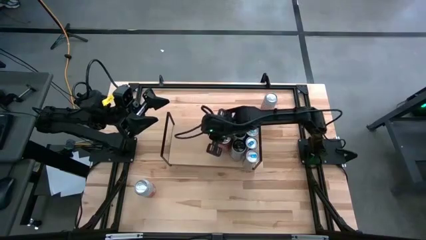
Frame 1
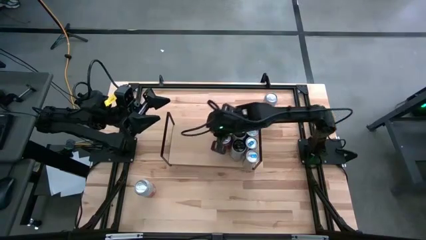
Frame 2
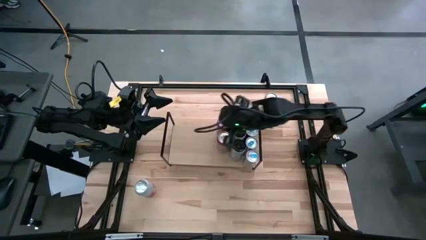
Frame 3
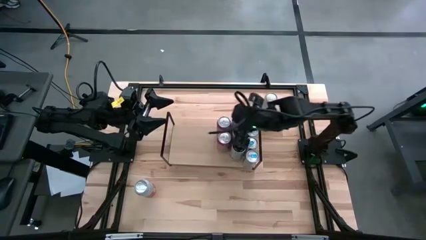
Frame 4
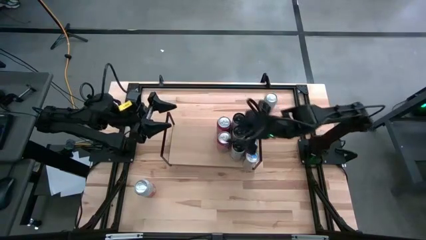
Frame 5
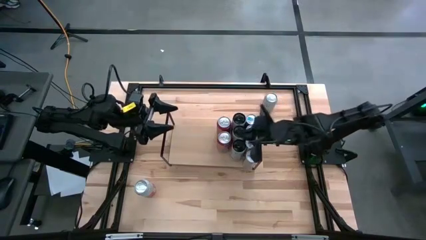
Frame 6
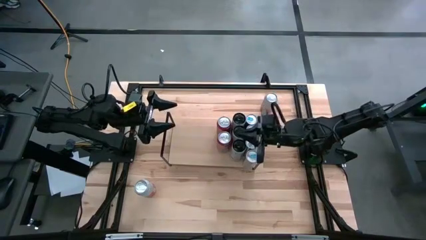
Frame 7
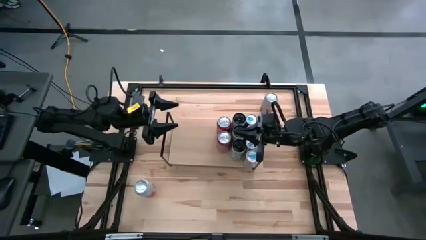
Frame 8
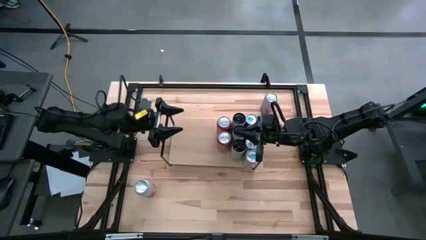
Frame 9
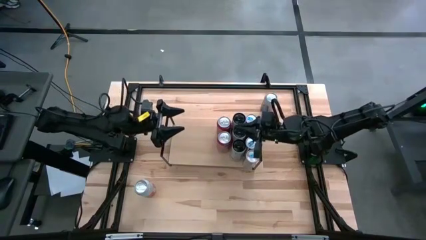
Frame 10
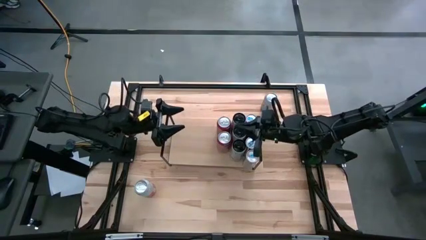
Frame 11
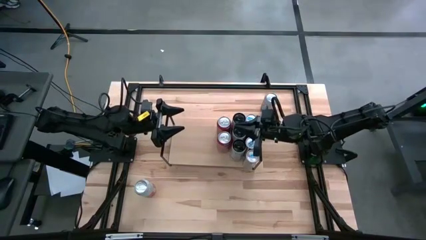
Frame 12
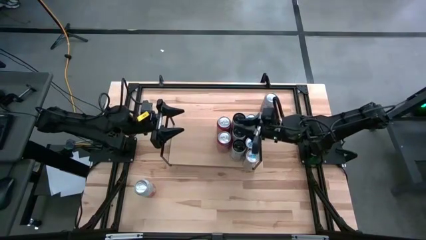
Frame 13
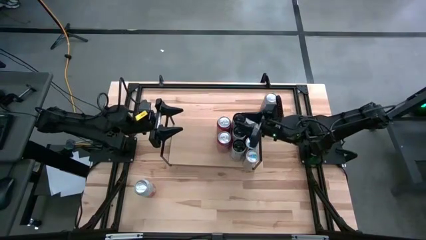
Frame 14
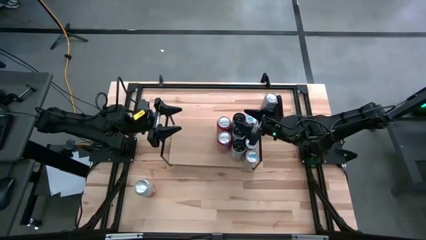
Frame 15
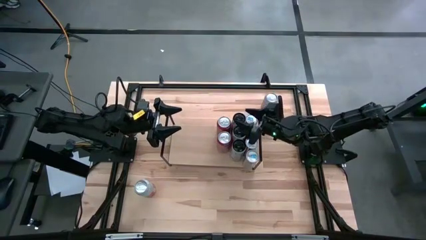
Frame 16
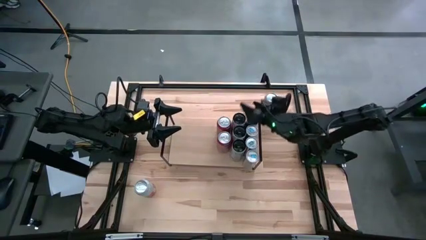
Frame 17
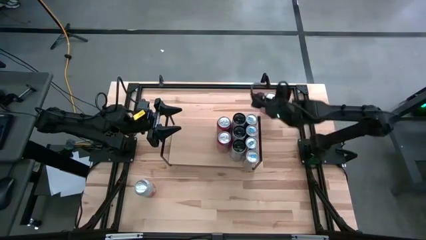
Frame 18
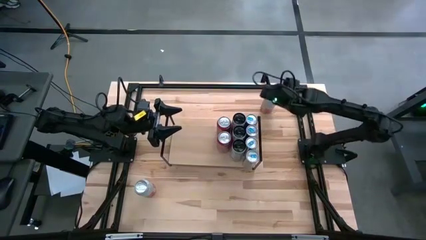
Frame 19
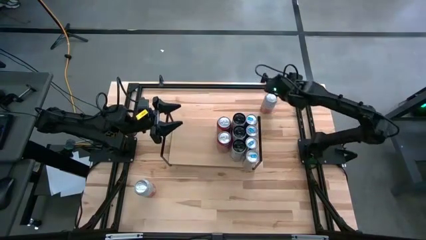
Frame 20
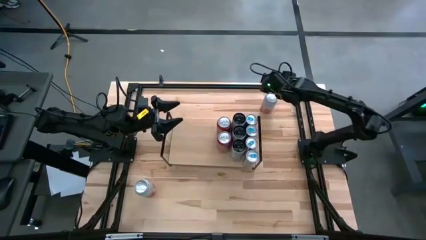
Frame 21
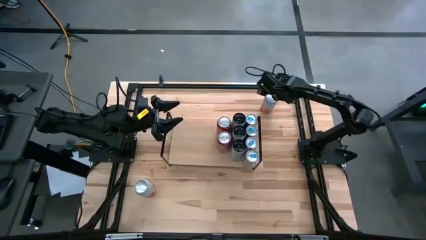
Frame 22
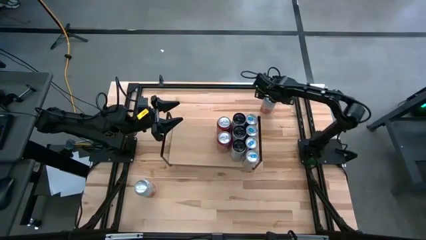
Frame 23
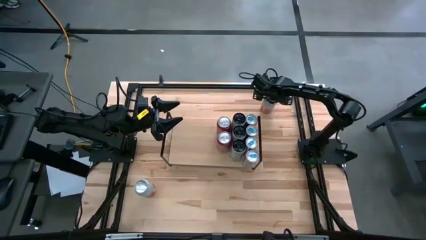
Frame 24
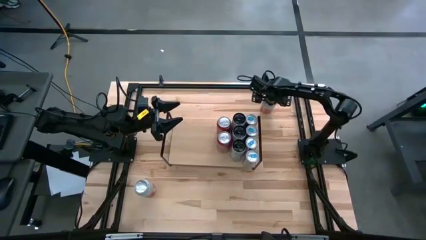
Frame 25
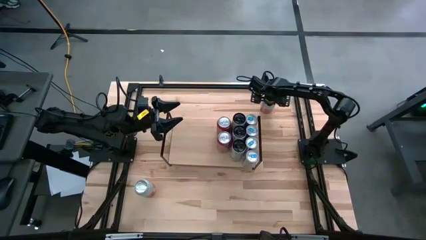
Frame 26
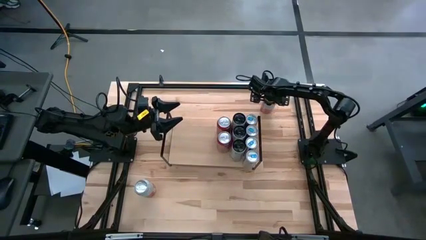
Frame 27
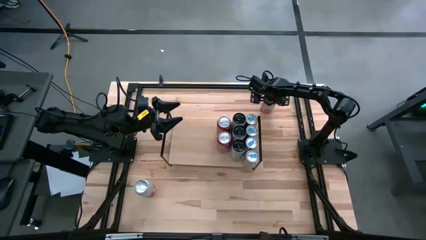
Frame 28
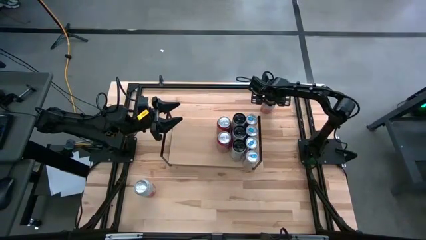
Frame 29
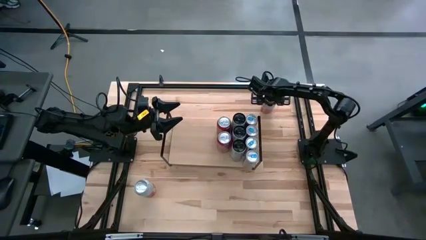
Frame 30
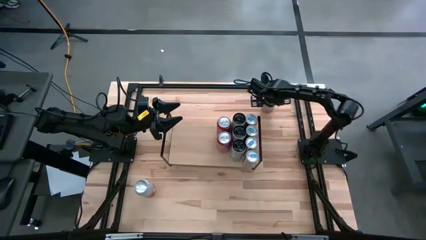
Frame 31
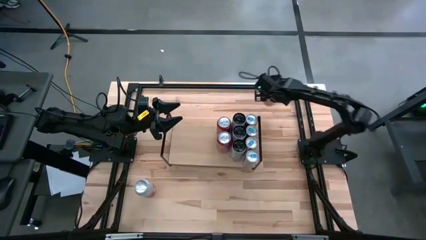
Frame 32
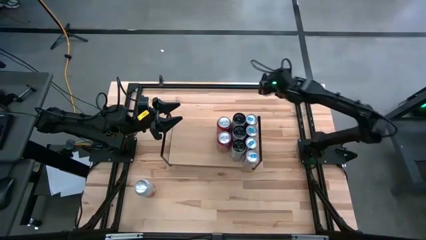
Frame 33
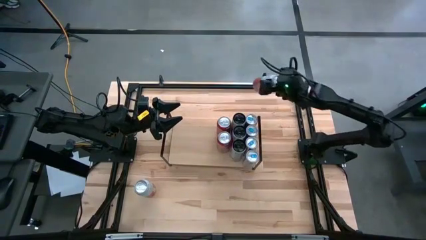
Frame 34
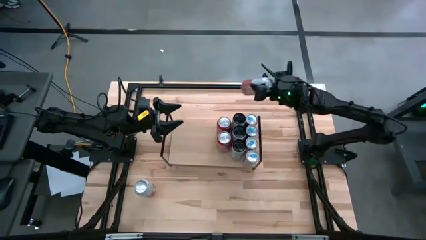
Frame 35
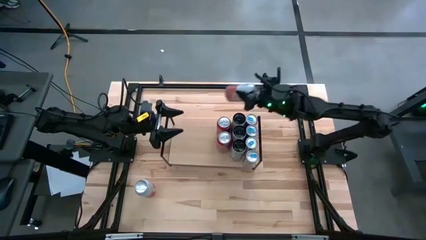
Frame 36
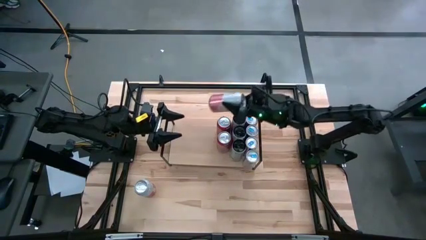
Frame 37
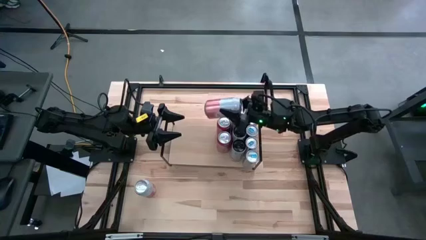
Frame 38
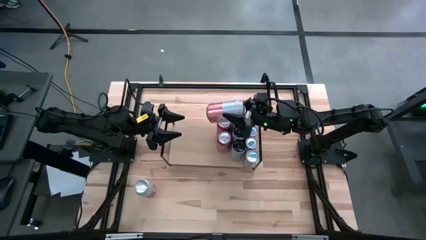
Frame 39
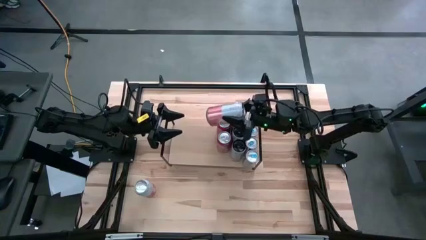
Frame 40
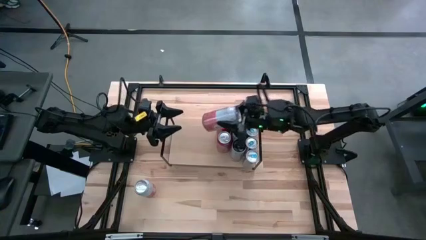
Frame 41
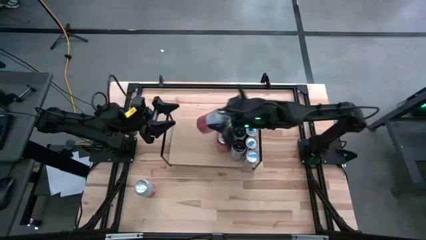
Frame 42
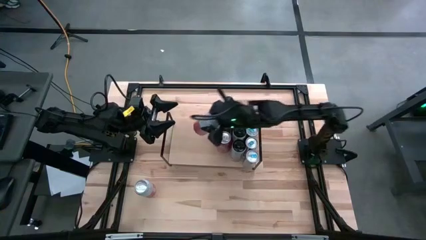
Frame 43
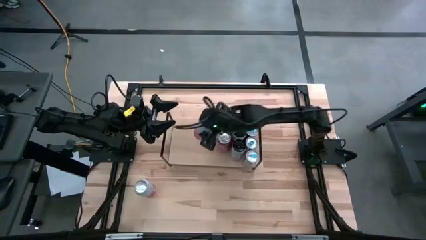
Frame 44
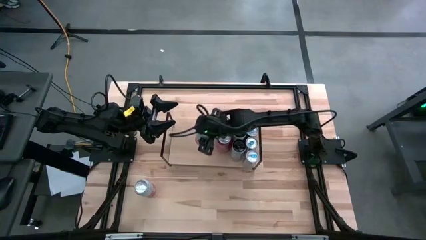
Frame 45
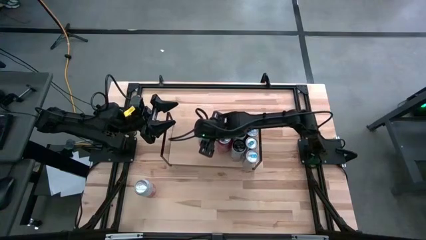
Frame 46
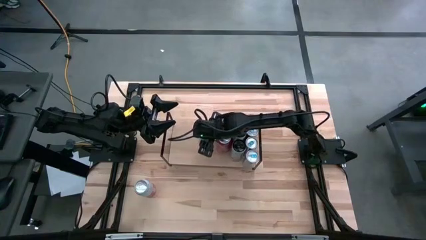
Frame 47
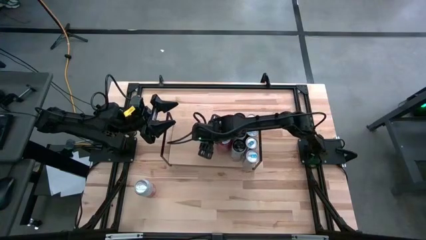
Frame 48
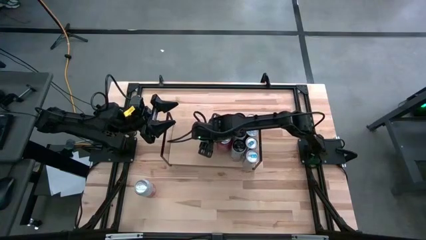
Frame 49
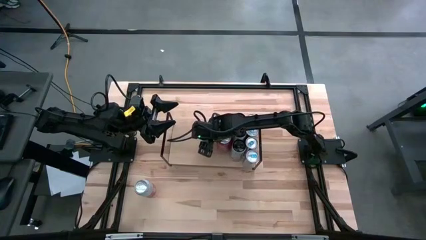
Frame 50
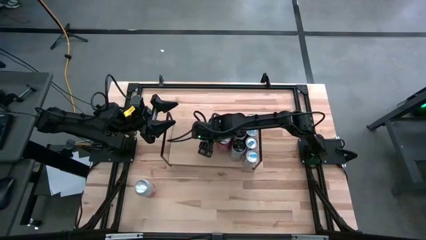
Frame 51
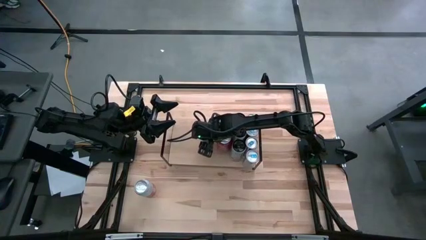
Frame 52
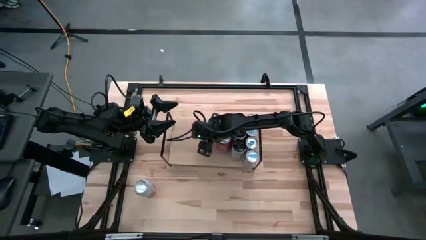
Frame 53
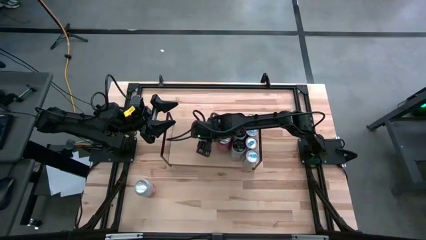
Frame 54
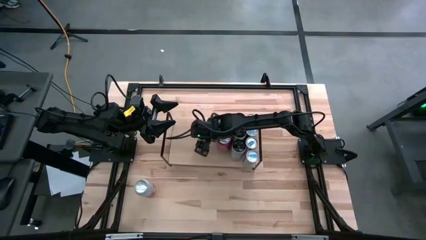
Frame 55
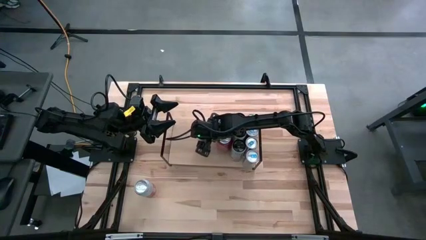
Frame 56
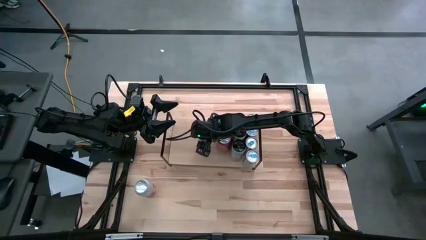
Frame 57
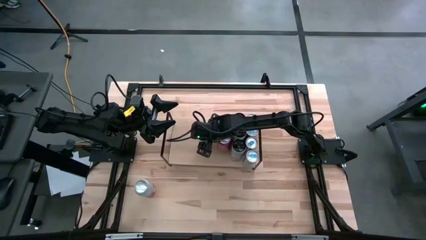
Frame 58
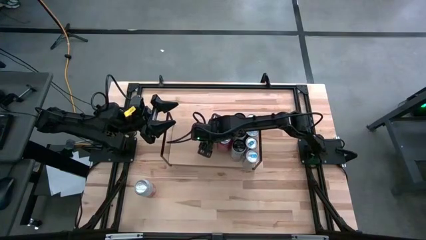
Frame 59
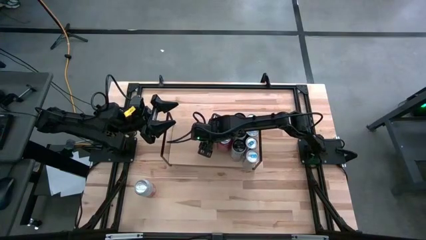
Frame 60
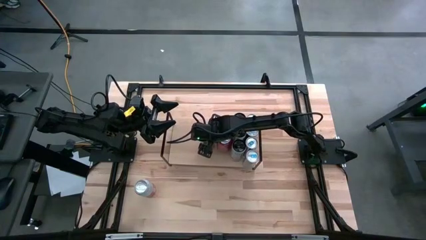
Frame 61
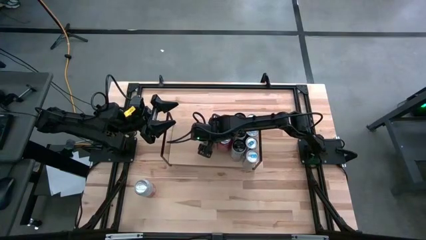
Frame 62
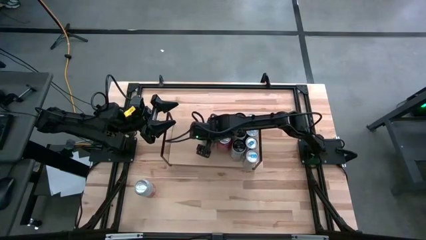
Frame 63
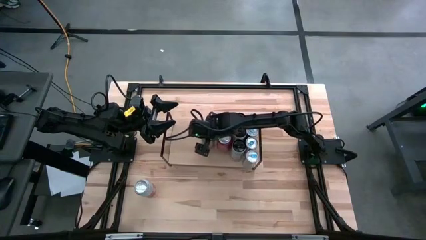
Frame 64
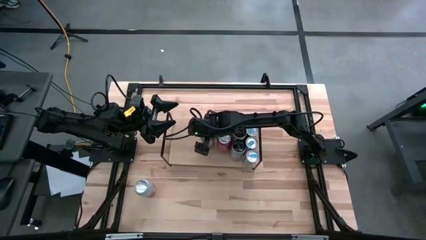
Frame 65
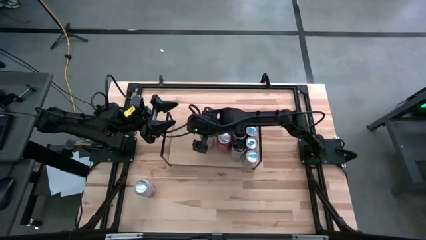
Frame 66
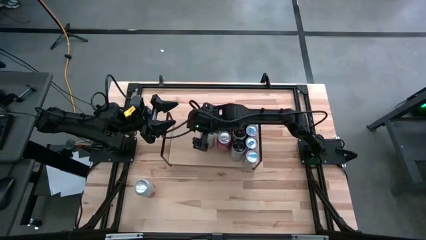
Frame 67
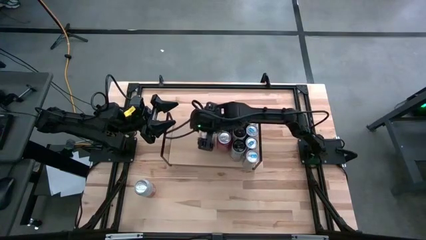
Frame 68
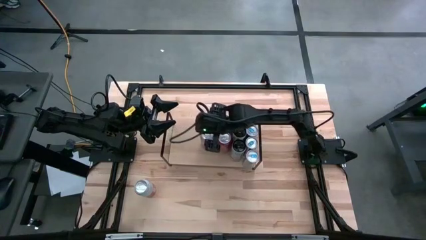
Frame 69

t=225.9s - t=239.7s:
Task: Place canned beverage on shelf
Put the pink soda can on the shelf
